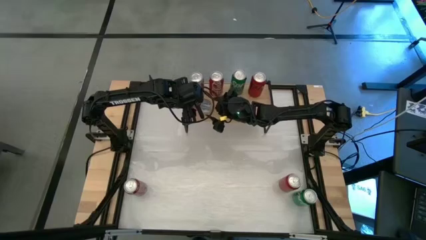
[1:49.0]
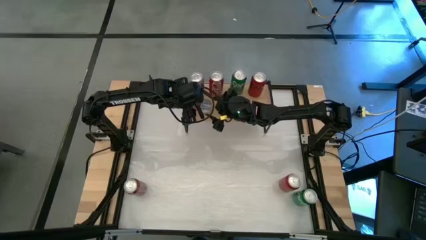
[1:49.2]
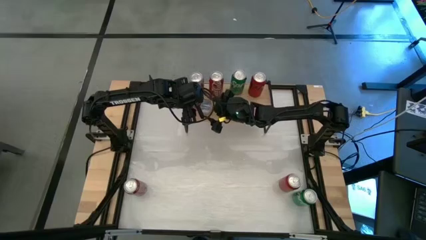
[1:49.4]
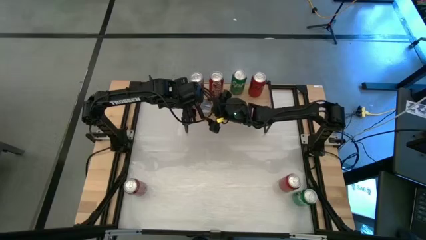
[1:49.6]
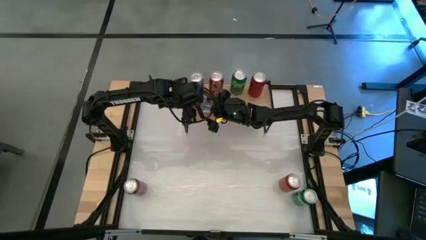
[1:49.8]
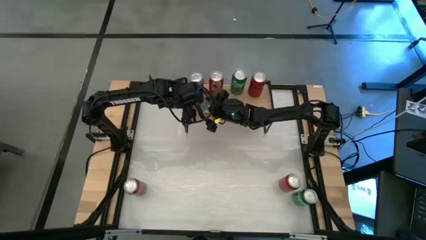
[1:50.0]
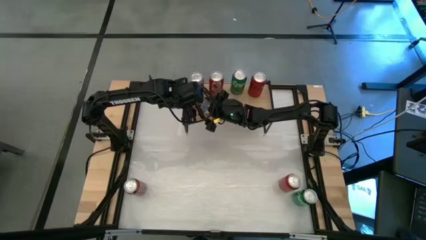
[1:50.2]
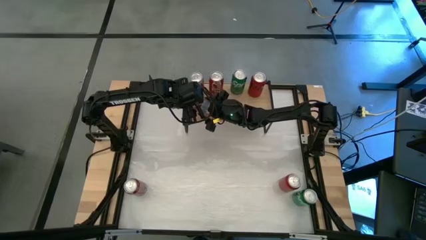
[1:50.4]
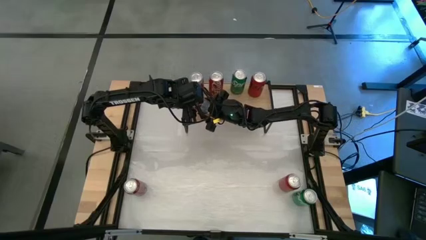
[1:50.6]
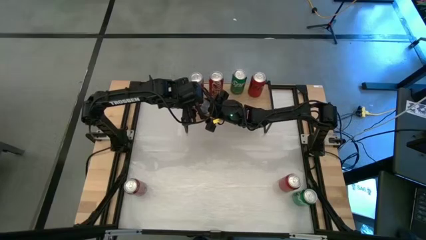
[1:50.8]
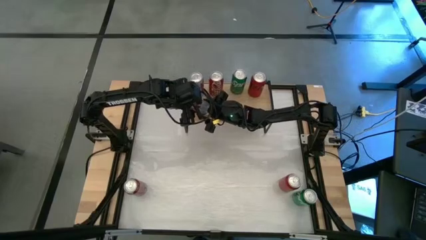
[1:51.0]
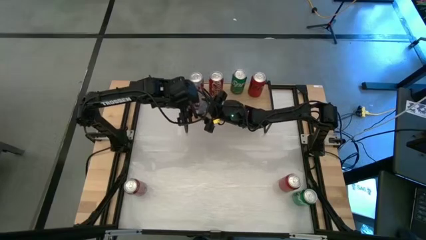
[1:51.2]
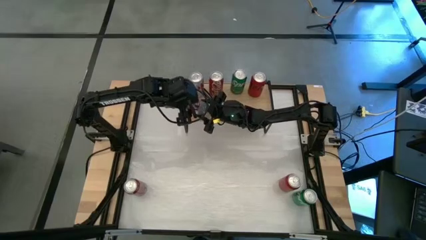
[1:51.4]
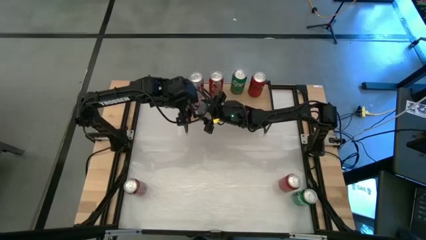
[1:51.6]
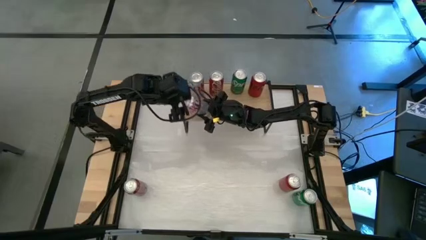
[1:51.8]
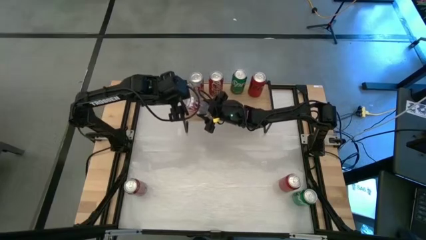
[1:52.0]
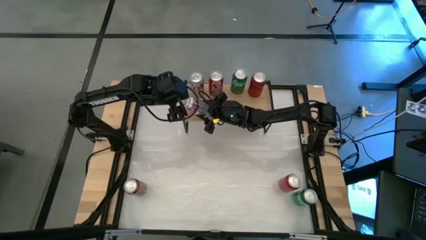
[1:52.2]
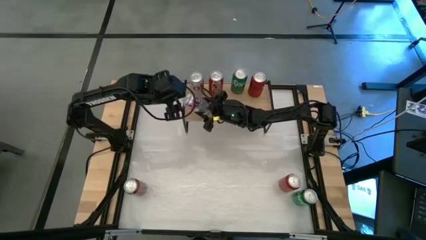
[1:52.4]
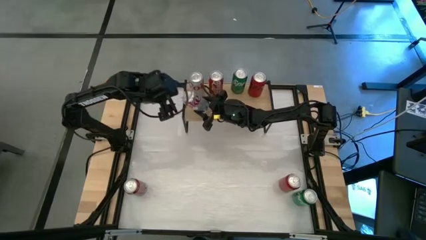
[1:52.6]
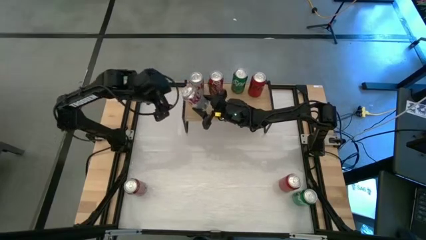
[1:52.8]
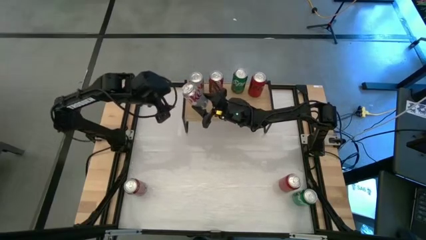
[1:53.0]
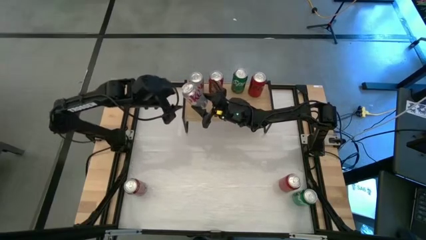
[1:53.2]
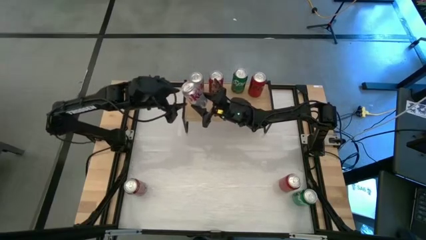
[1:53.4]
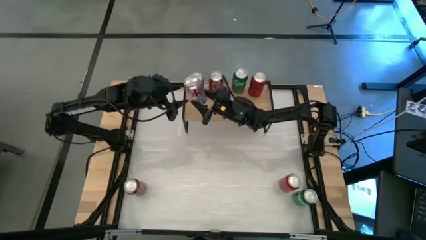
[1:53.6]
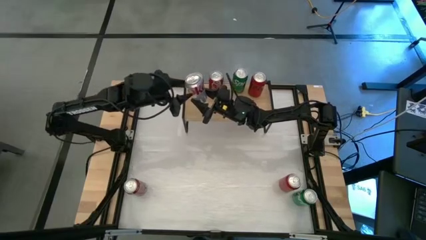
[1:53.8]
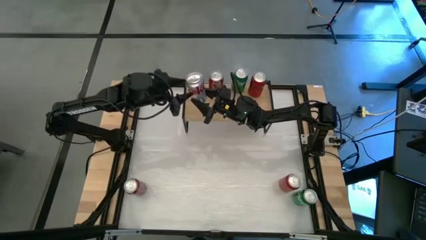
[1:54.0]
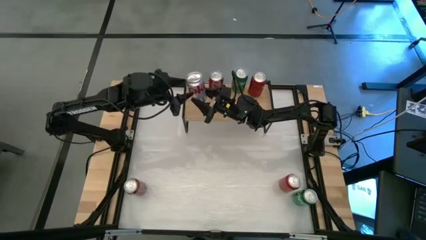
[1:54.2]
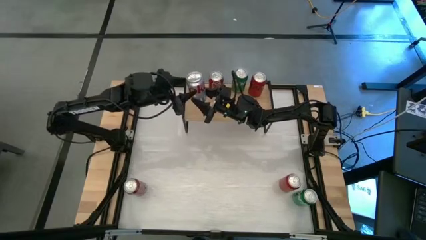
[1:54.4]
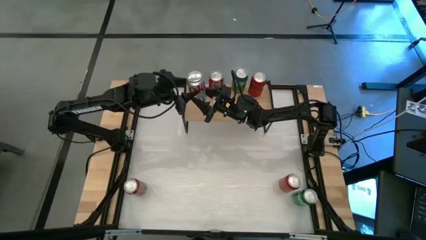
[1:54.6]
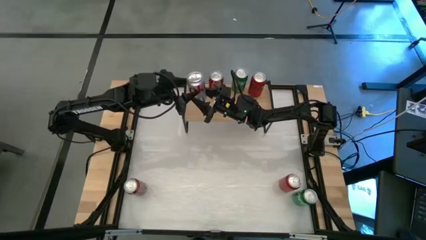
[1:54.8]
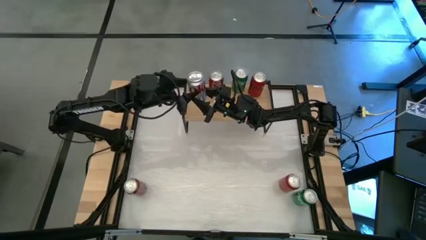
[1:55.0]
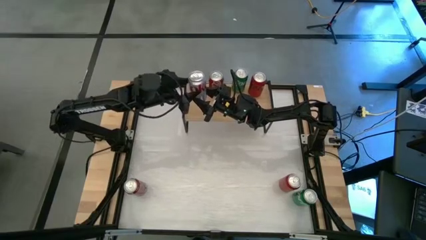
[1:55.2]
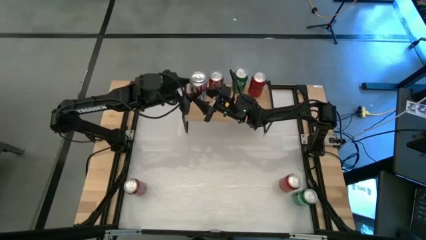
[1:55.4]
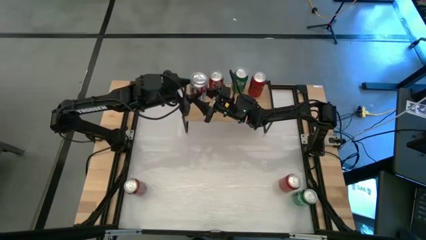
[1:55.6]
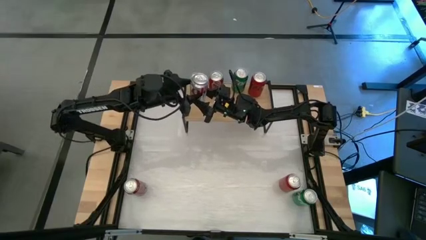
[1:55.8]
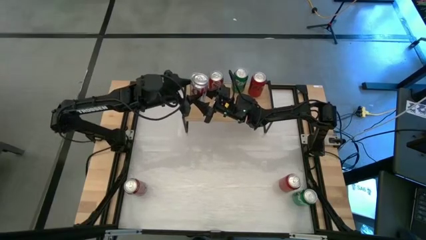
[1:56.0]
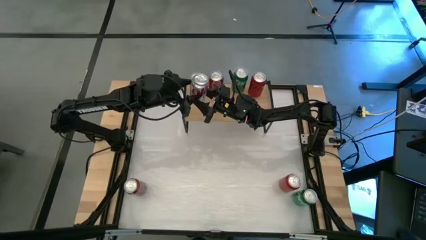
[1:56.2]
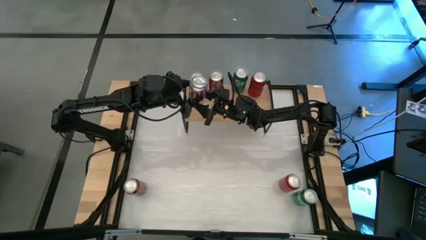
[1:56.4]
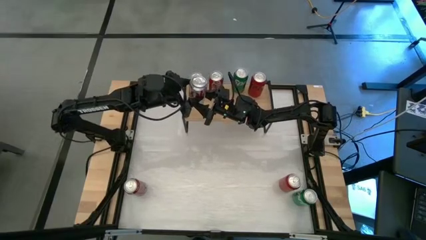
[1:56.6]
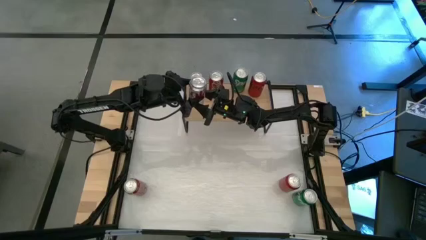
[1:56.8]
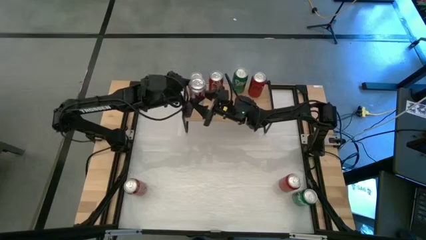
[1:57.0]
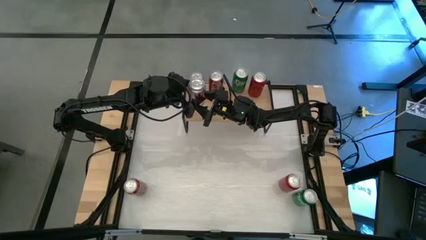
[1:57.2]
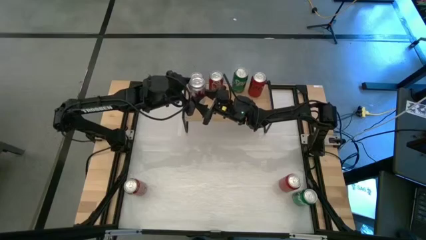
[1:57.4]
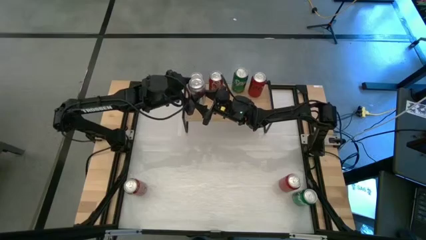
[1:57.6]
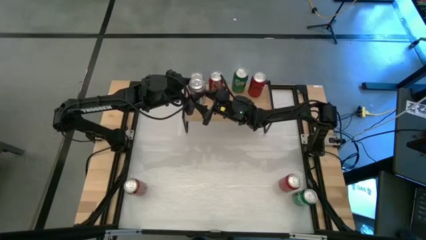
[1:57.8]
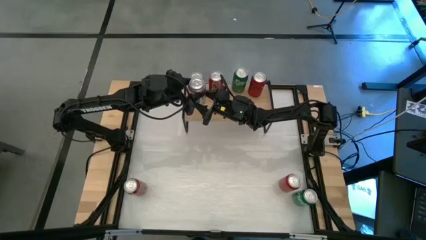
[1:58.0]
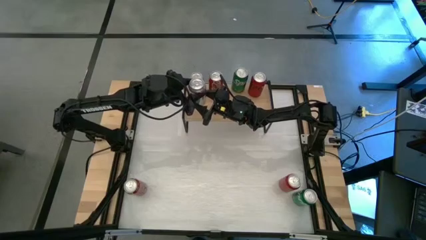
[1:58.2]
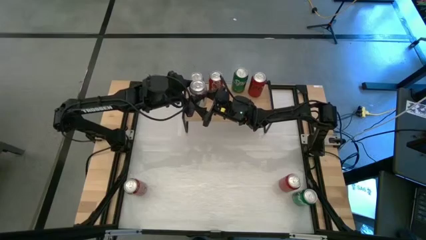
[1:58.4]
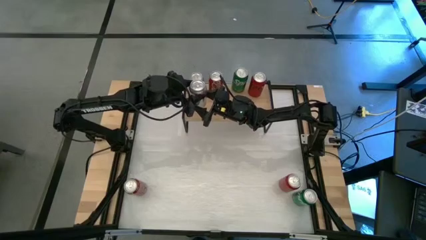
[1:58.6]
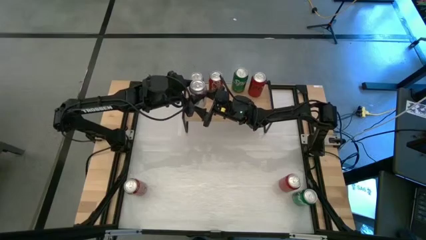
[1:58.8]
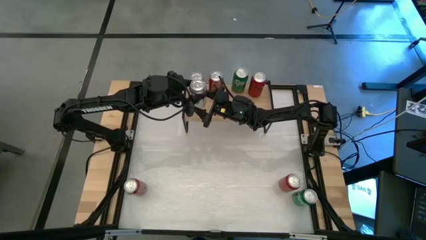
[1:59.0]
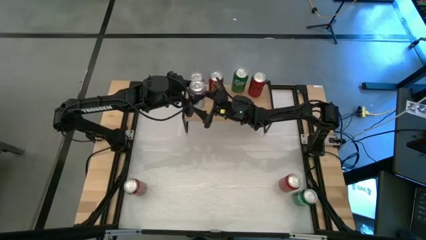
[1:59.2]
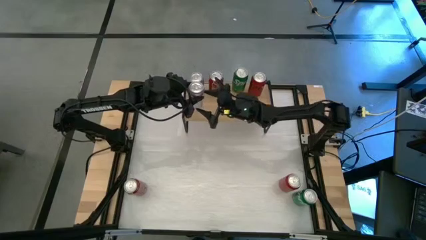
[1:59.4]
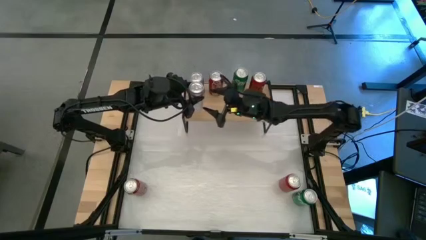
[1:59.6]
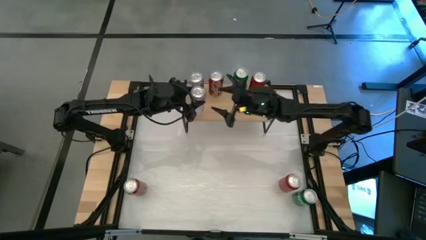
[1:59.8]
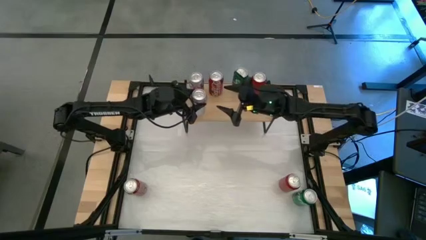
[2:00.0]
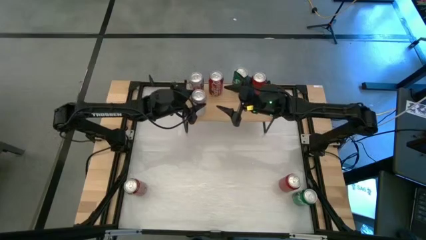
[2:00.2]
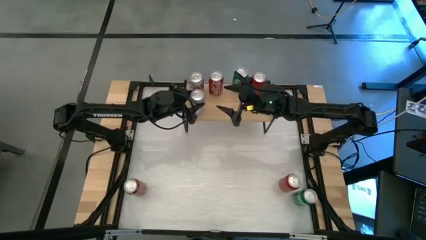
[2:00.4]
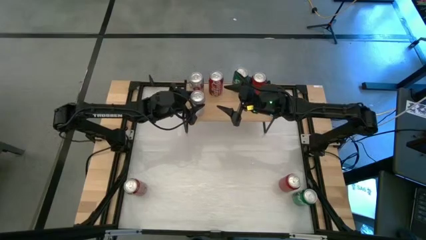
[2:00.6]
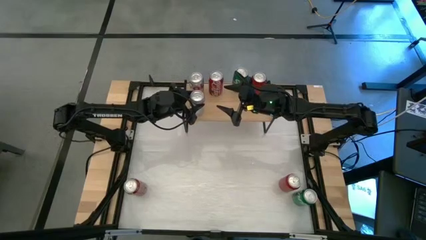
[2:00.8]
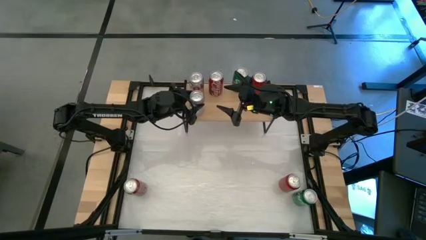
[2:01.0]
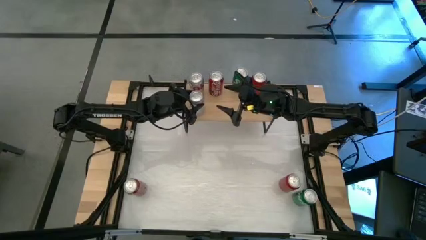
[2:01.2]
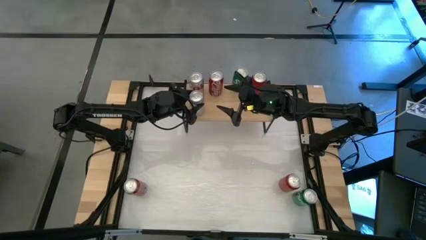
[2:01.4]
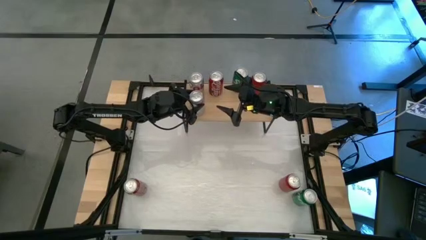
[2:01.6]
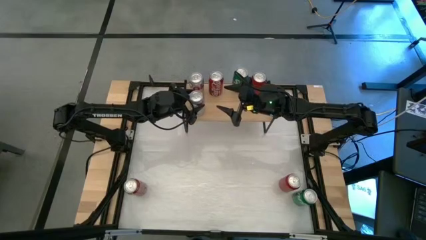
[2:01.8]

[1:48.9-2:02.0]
Task: Place canned beverage on shelf
Put the red-silver soda can aligned with the other red-silver soda can on the shelf

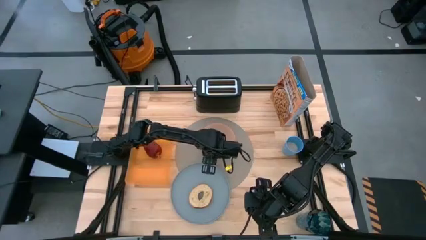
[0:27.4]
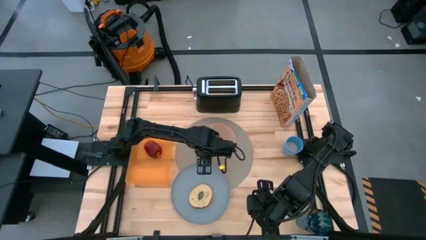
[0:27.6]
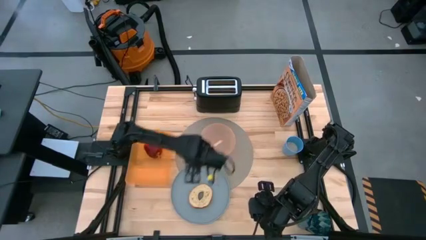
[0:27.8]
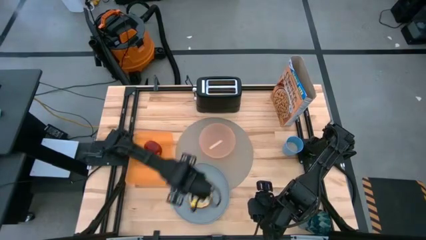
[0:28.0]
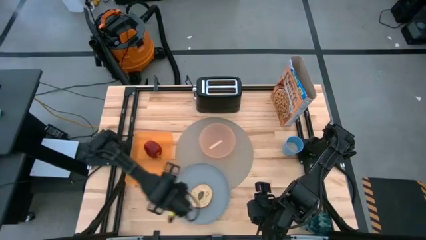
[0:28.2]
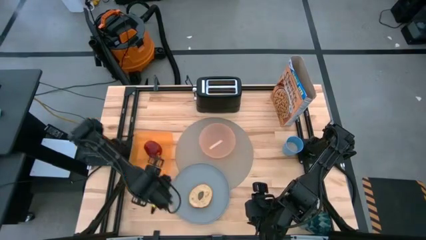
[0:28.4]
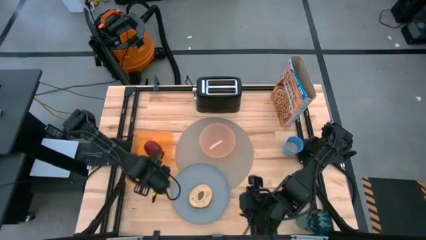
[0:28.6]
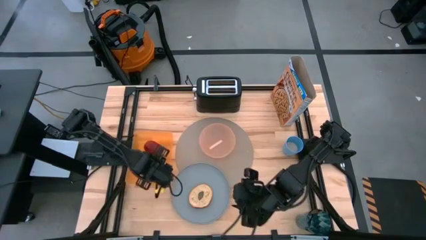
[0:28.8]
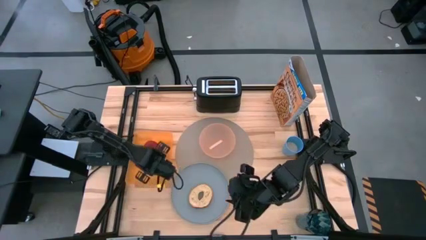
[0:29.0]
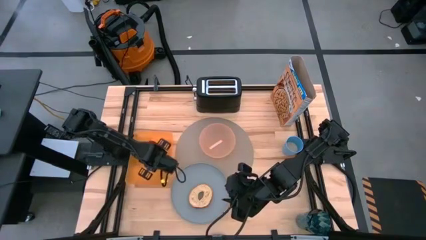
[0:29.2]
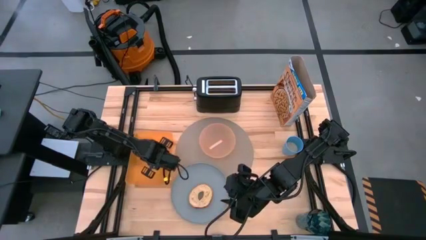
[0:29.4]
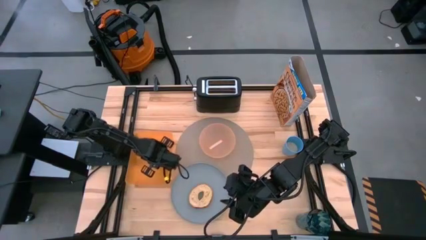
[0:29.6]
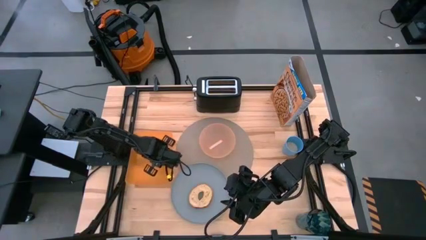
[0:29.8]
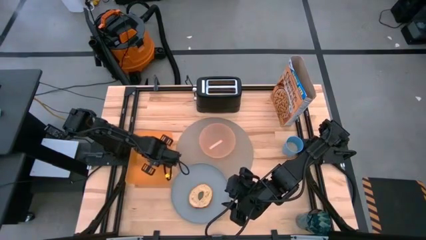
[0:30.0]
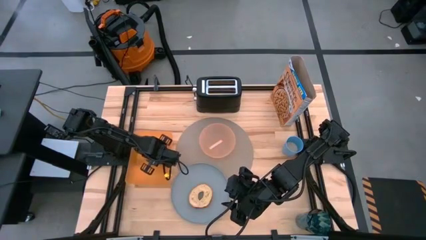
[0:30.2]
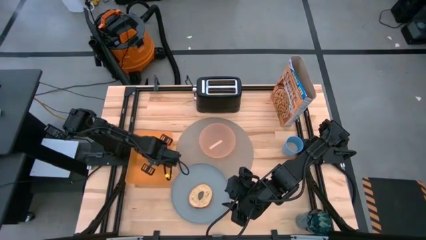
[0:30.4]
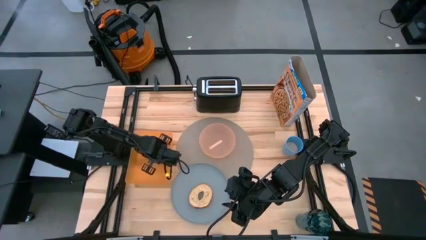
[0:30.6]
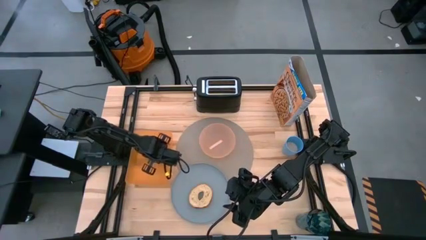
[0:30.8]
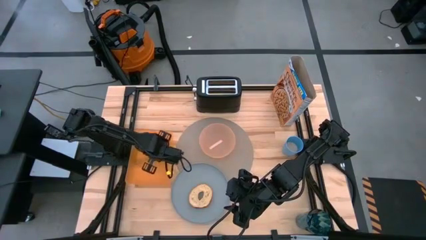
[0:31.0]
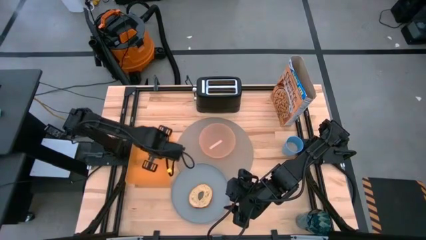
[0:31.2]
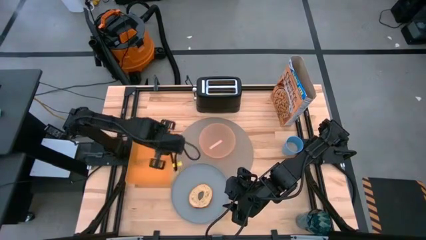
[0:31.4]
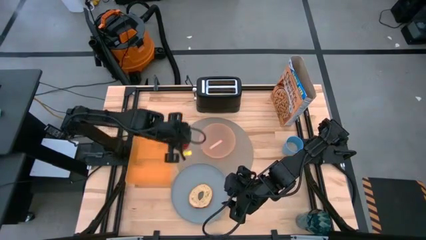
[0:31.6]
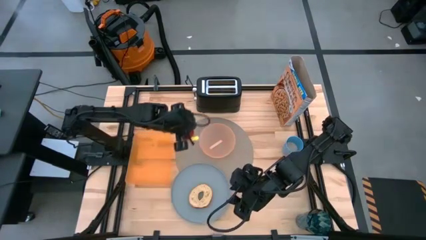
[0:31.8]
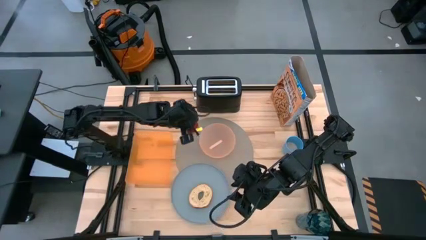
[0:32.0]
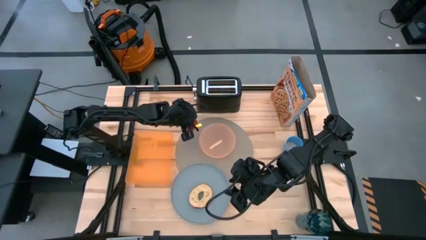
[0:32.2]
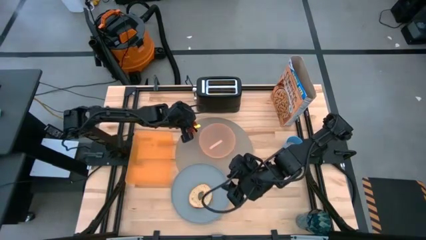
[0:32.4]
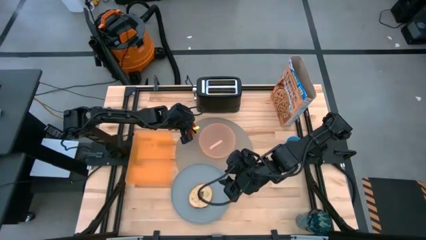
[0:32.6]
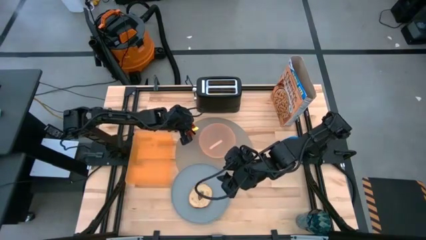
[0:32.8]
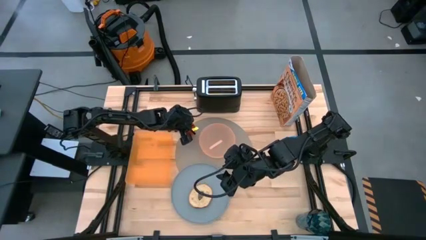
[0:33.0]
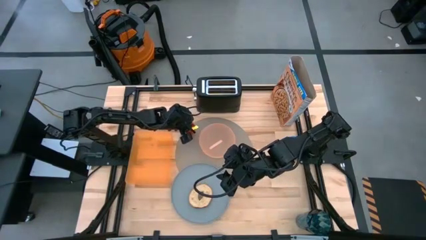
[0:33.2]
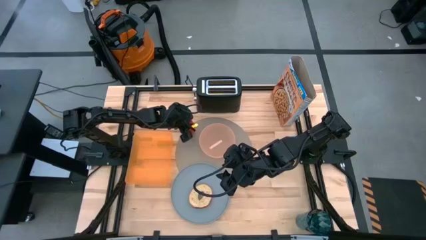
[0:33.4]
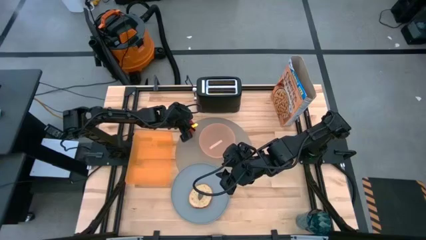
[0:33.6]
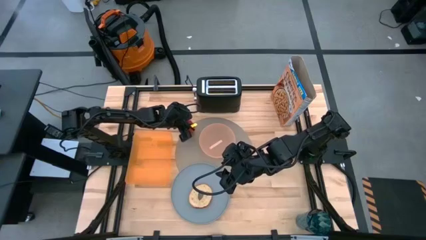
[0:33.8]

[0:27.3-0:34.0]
Task: Arrange a breakfast setting
Put the apple on the top left of the gray placemat
